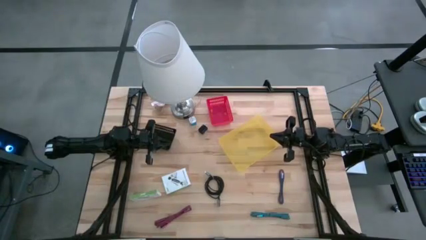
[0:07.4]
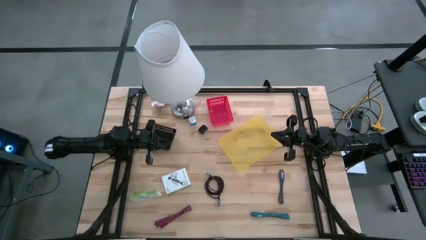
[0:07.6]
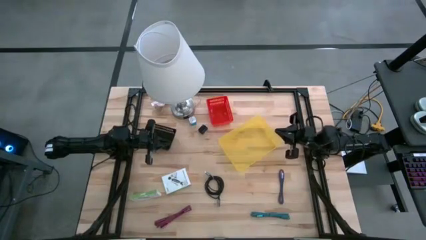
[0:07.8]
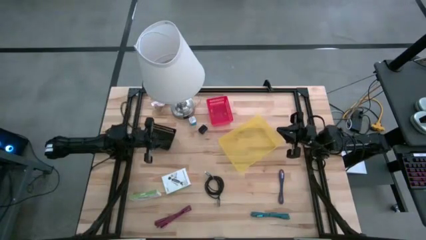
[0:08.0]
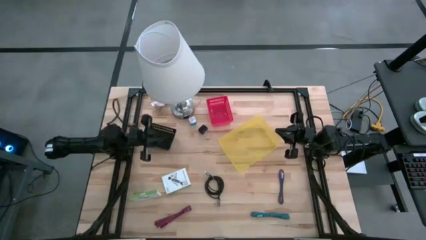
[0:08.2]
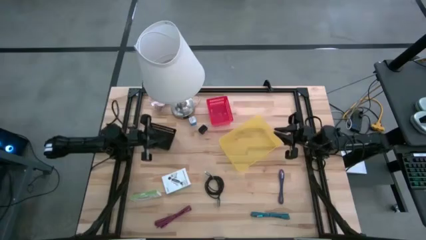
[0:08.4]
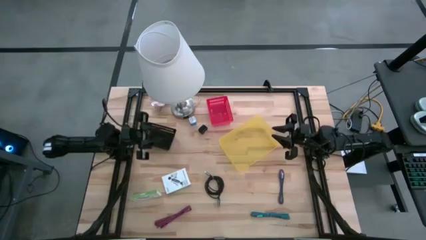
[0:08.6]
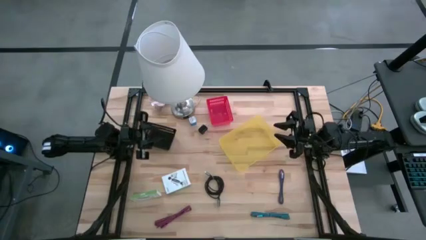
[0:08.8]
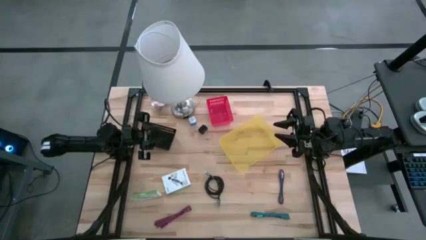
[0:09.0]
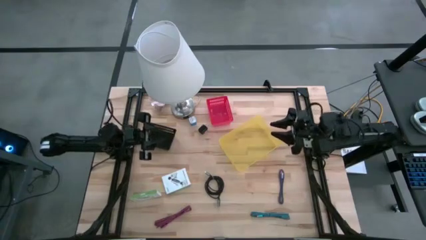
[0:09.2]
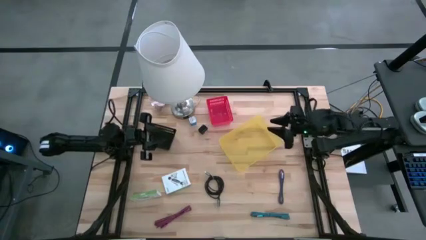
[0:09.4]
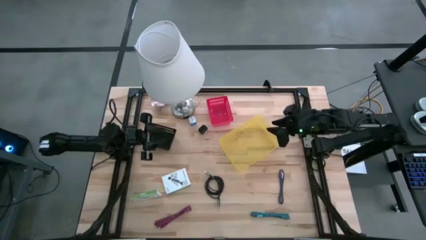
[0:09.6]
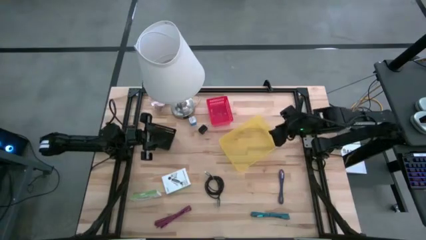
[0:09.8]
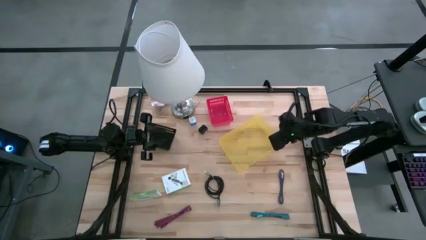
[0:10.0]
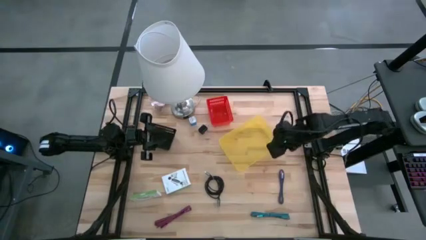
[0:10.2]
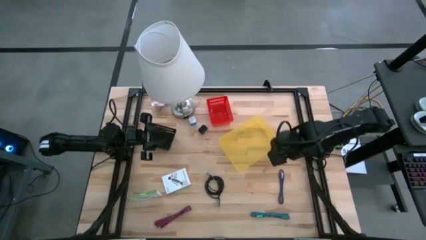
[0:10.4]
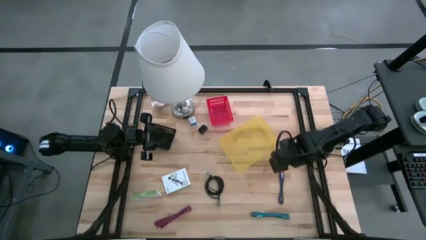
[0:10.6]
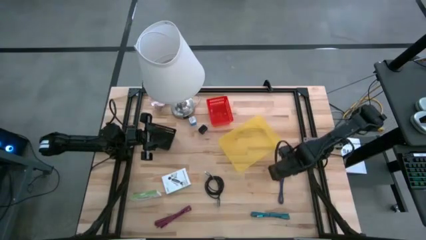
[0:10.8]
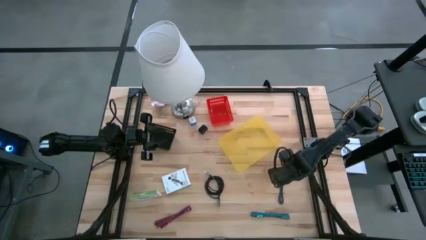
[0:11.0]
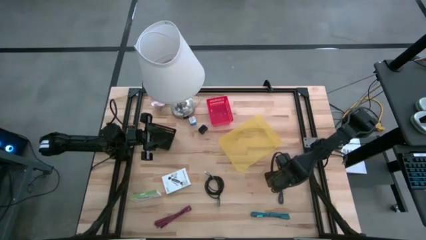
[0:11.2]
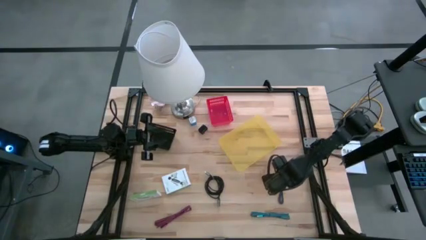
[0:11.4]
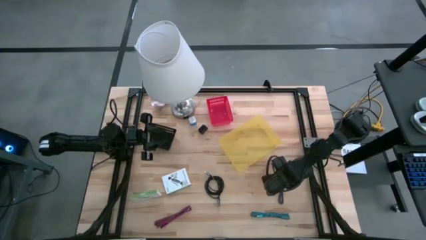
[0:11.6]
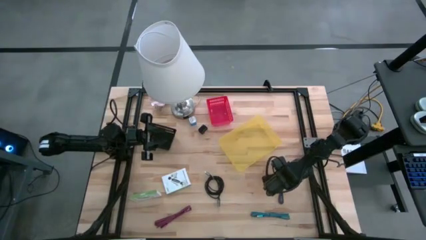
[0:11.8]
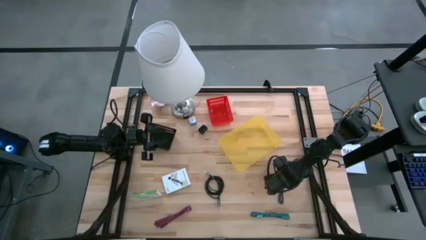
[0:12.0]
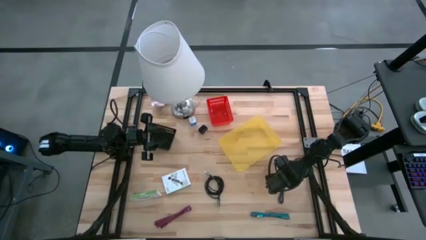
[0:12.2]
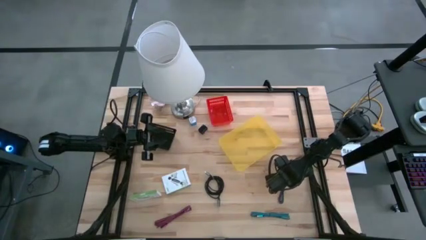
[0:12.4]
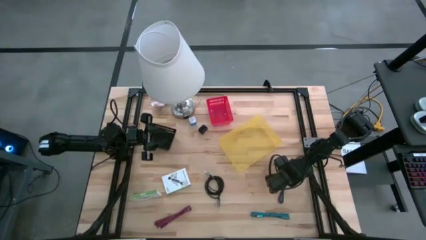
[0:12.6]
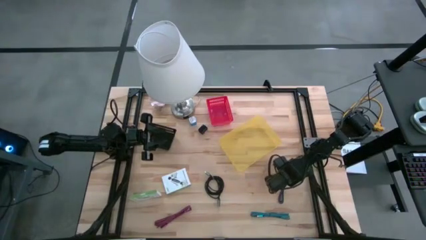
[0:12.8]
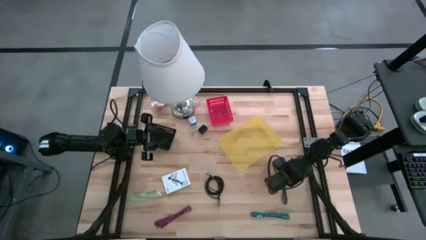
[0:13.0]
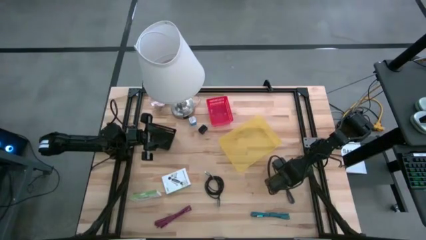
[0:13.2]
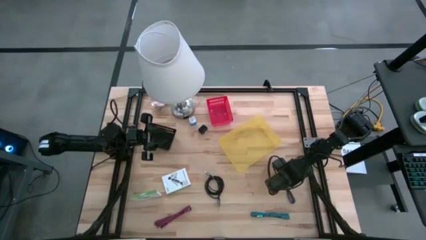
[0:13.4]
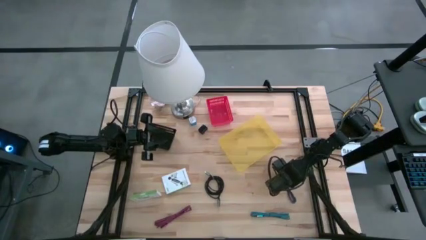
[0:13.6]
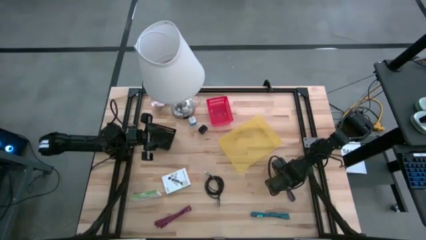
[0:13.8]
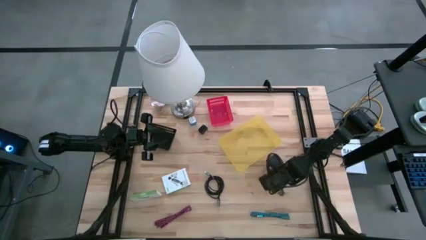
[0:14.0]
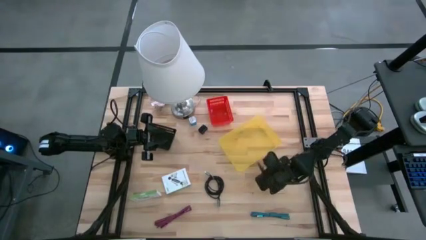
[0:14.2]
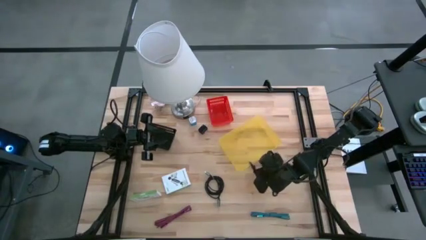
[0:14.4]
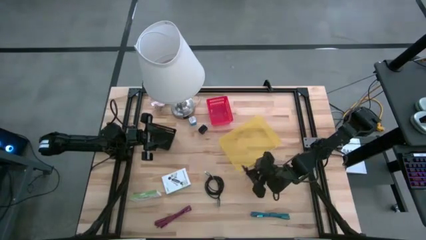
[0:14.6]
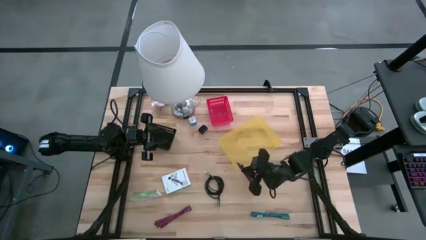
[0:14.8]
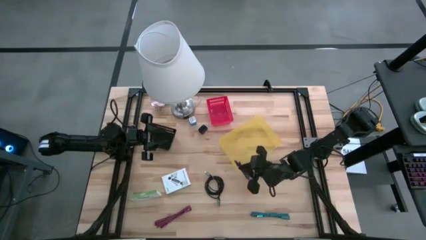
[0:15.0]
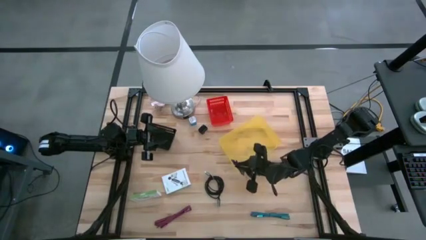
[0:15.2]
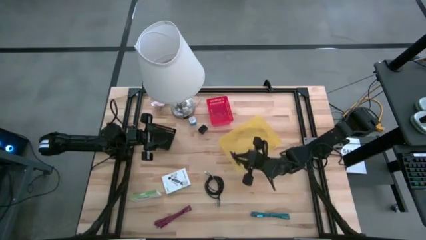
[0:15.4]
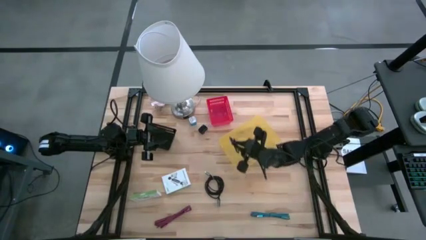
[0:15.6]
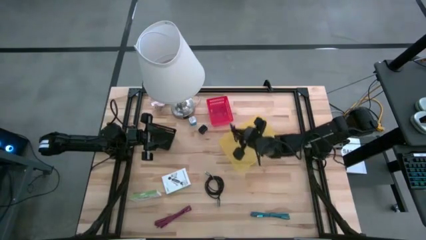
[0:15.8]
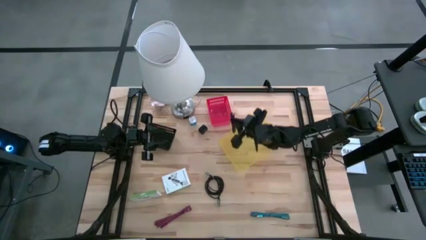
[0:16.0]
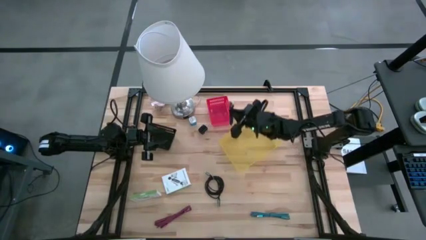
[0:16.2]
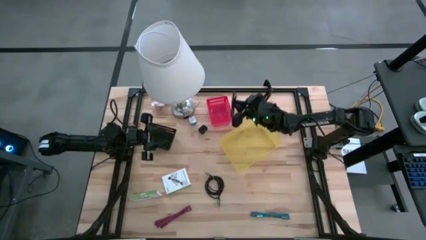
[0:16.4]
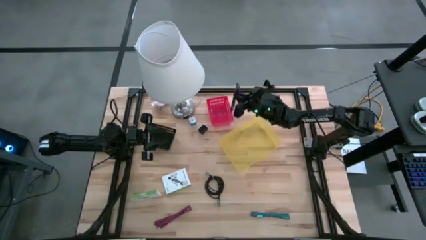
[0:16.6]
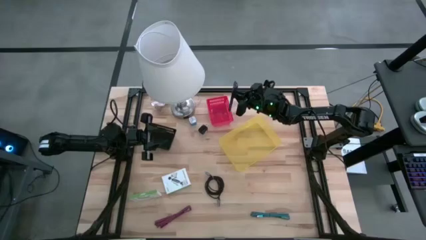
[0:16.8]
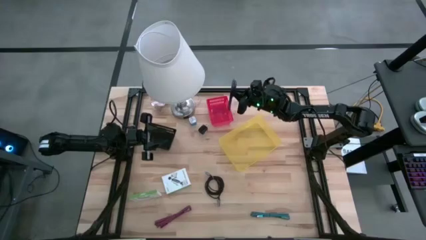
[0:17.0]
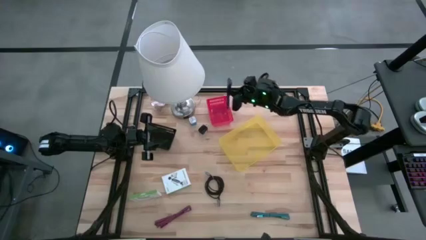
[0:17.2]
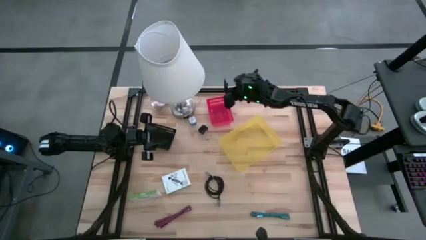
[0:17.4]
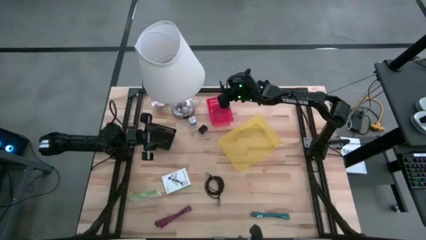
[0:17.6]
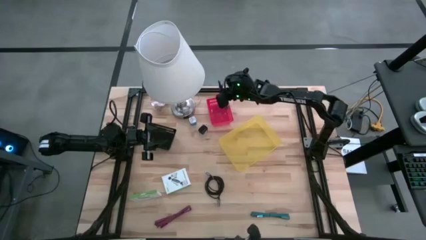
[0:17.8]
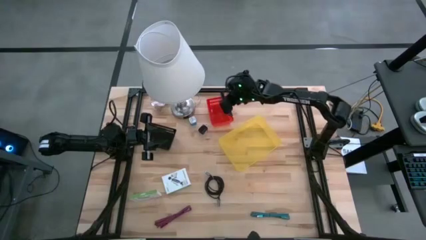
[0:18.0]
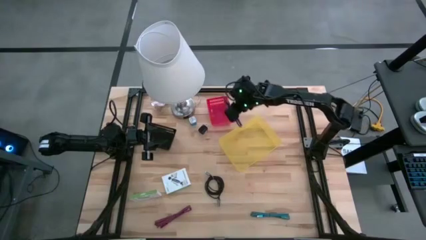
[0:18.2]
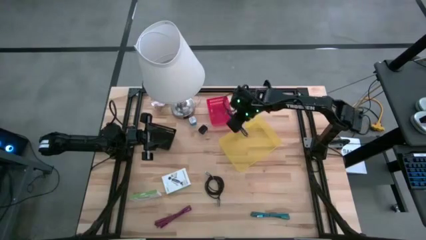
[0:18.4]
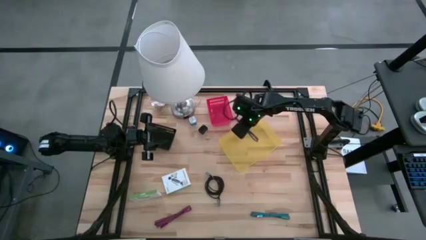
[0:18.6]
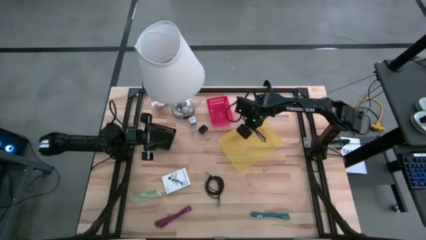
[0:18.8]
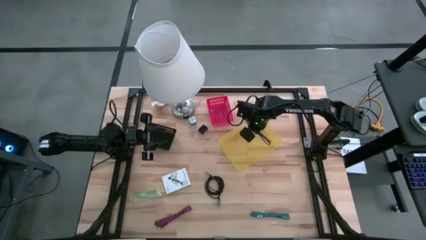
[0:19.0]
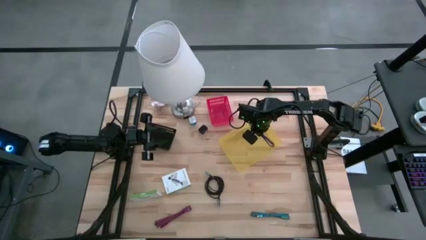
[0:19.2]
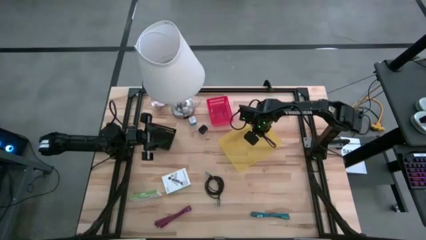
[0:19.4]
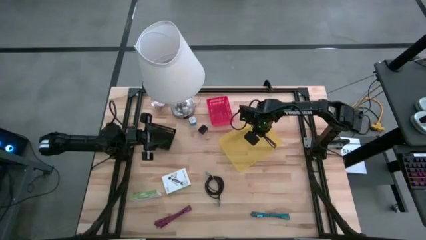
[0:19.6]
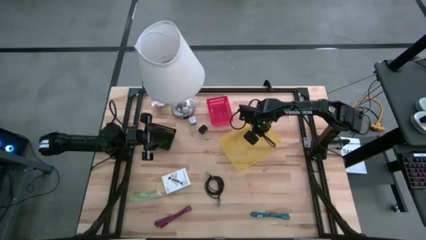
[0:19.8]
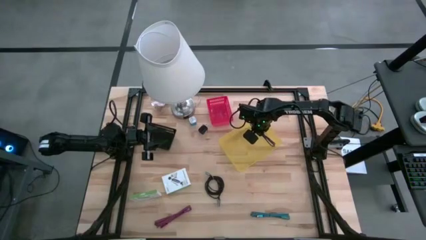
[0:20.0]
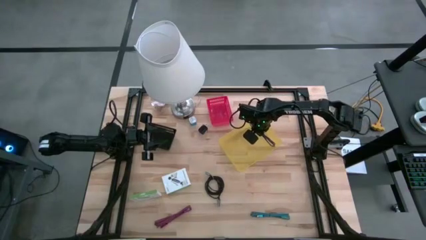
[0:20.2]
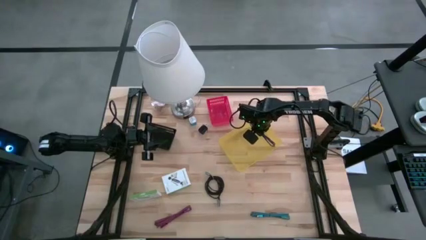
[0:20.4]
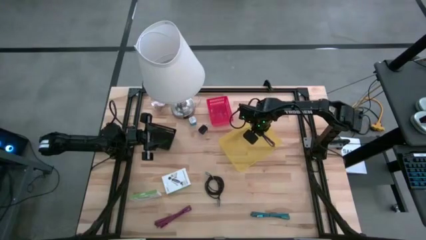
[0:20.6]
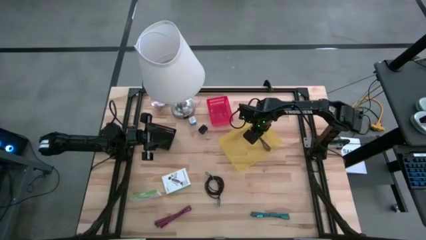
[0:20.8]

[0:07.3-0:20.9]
Task: Pick and place items into bin
Put the dark blue charger cable into the yellow bin
